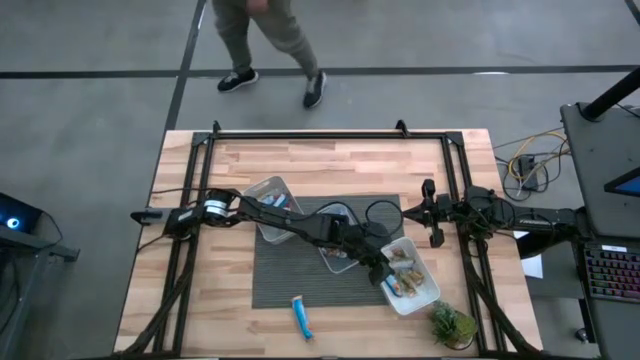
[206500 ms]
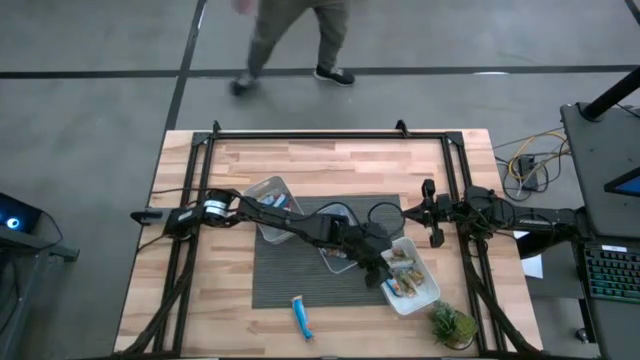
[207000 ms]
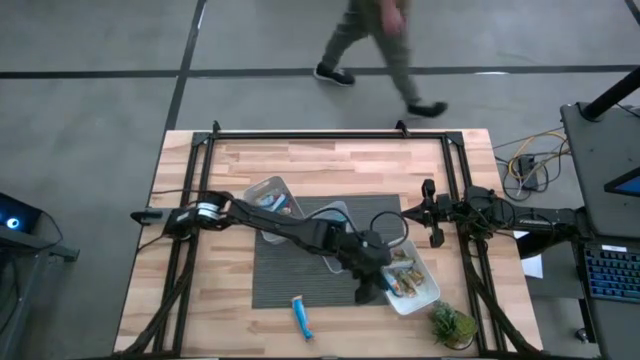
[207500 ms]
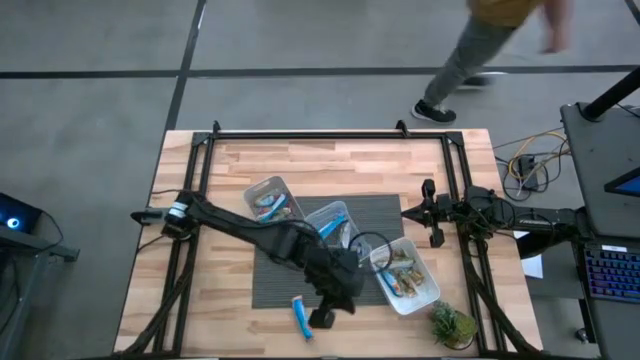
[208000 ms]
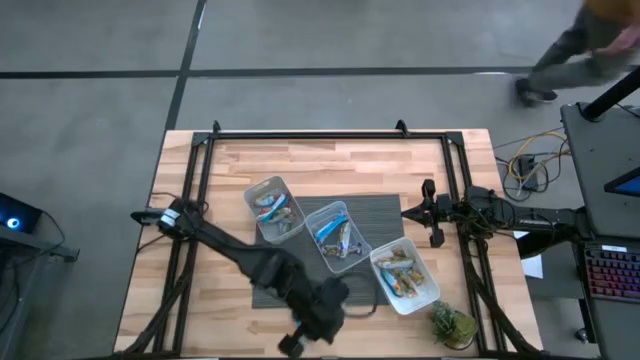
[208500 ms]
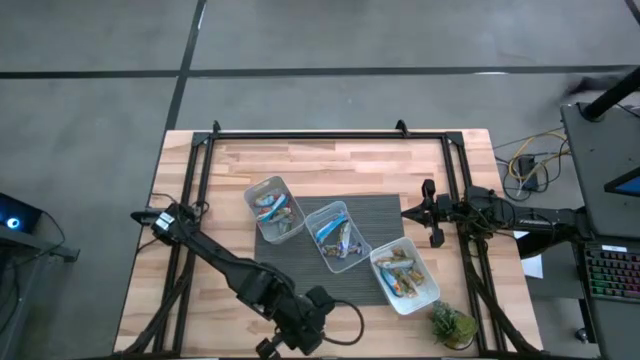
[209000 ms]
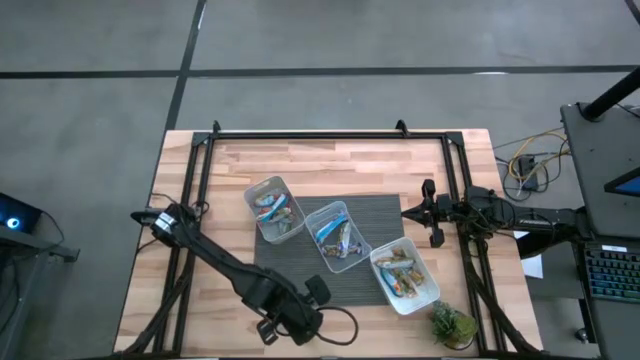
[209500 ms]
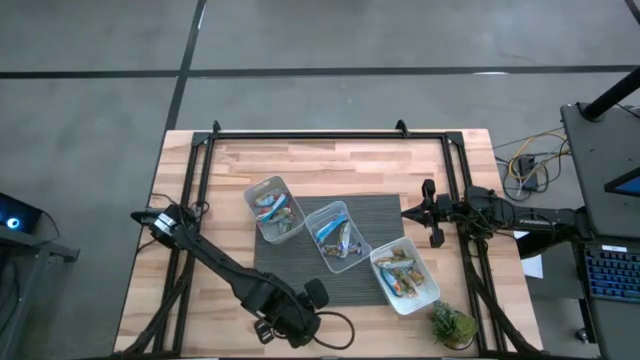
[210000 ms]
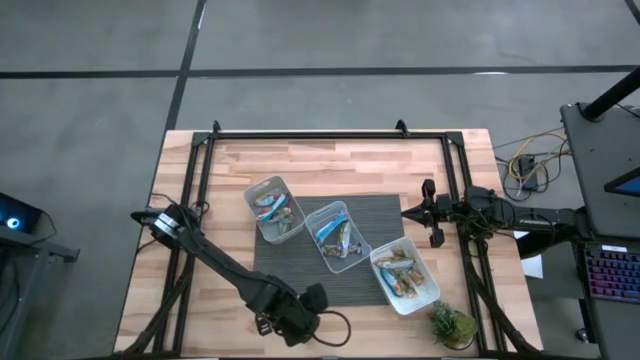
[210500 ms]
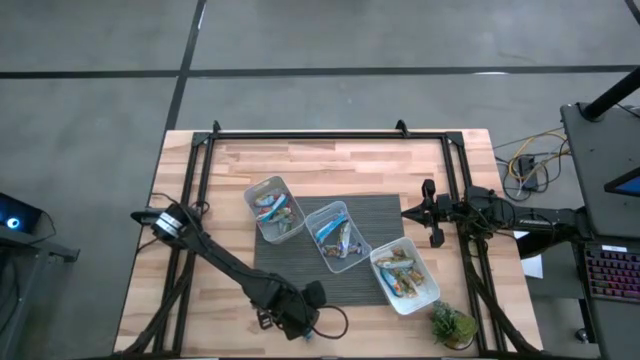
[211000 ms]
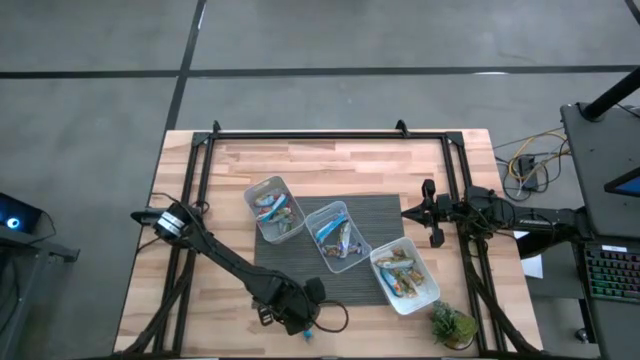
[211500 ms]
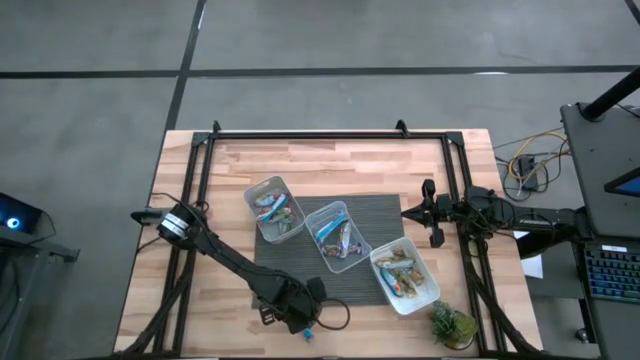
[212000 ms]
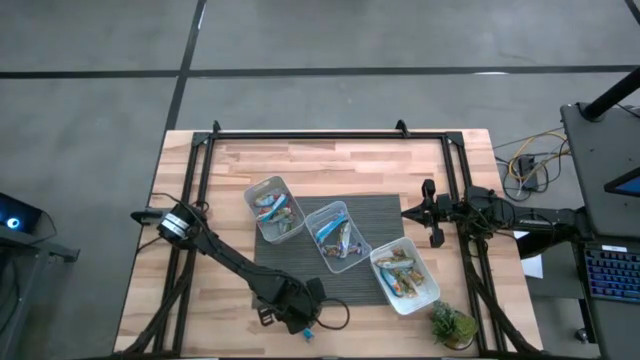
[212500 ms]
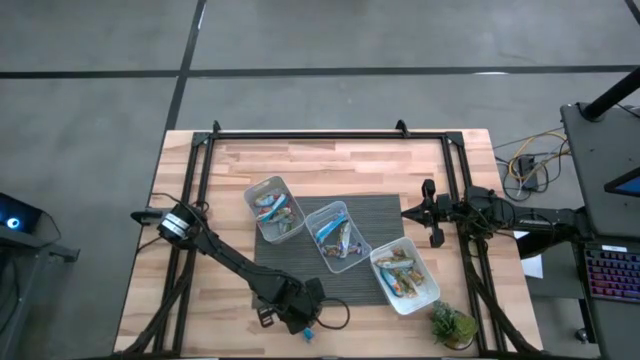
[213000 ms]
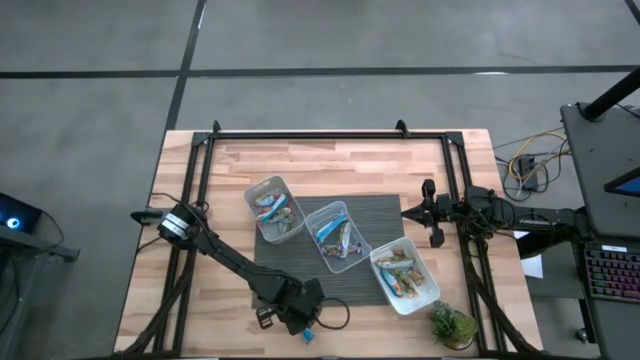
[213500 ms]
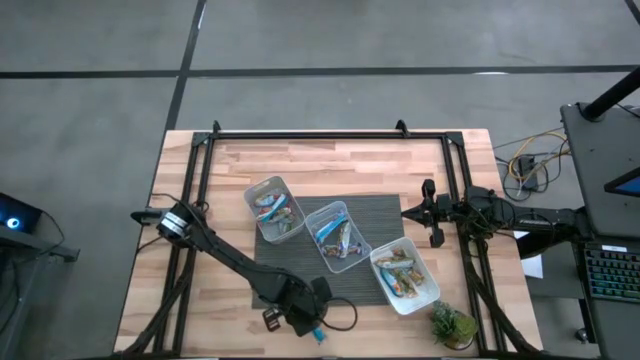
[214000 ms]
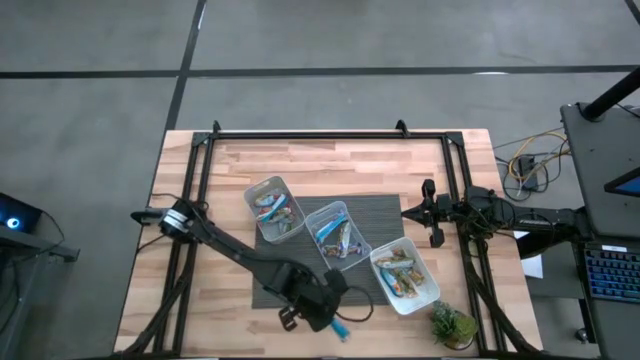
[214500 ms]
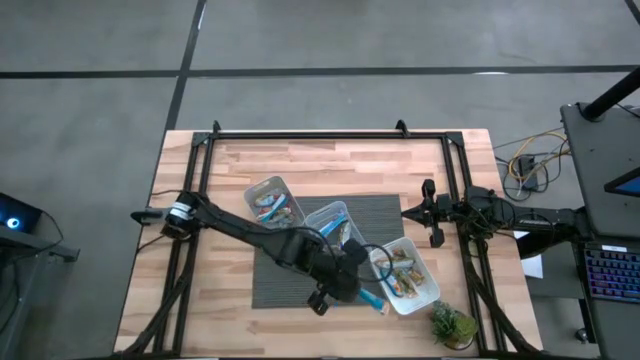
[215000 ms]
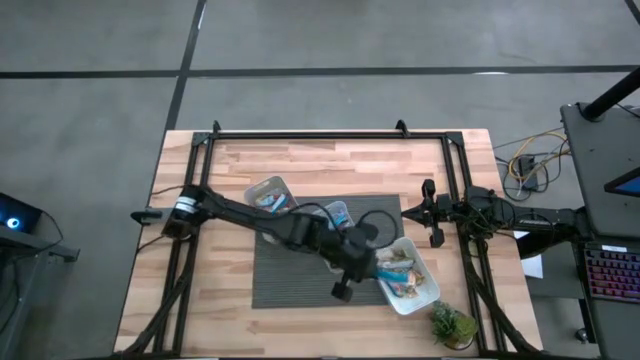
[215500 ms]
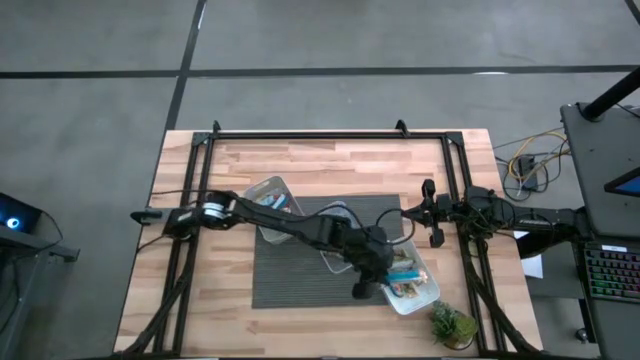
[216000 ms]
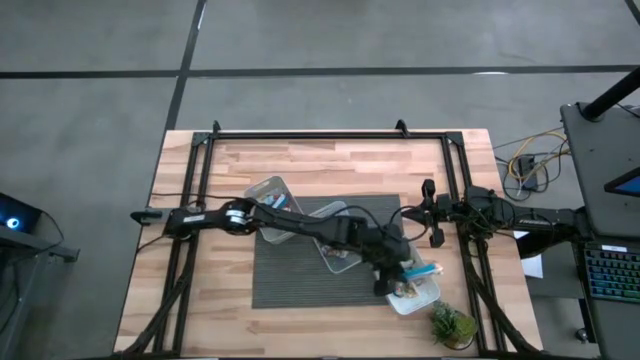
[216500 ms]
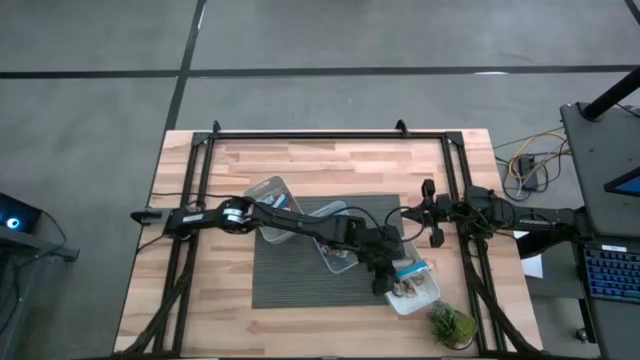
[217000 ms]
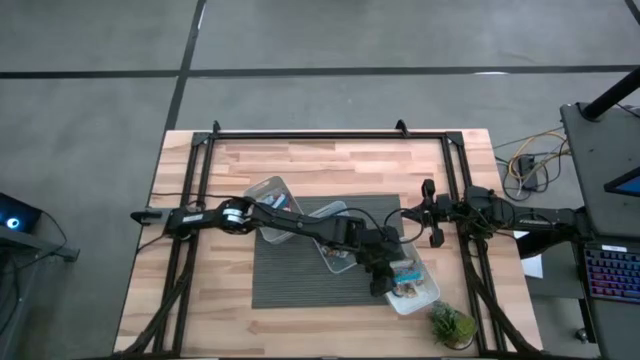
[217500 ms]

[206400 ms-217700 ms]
Task: Pick and place Granola Bars by type
Put the yellow granola bar into the white bin

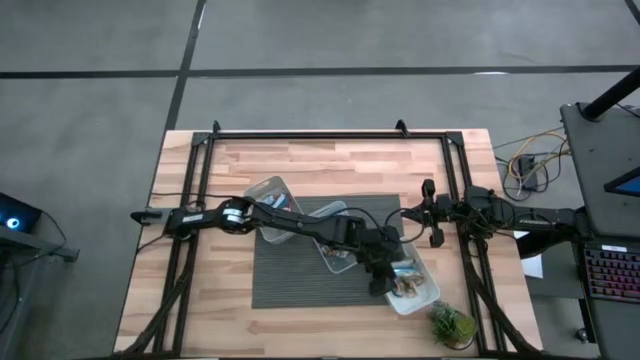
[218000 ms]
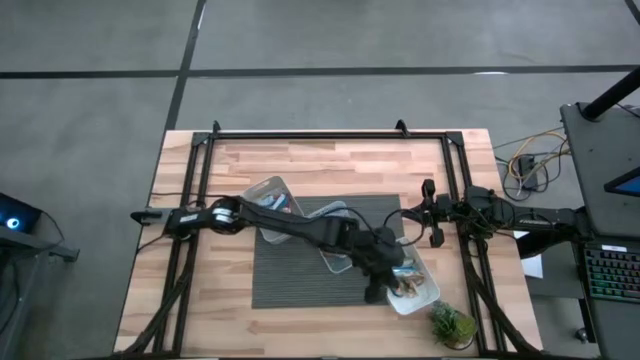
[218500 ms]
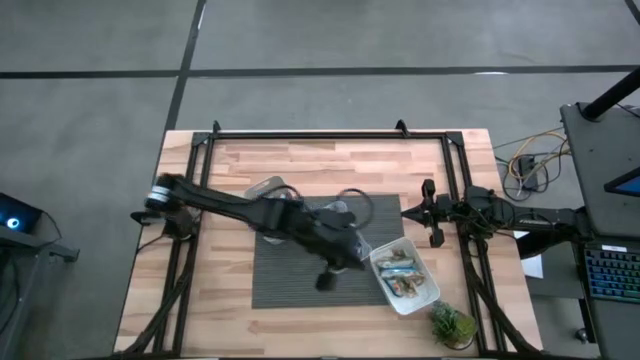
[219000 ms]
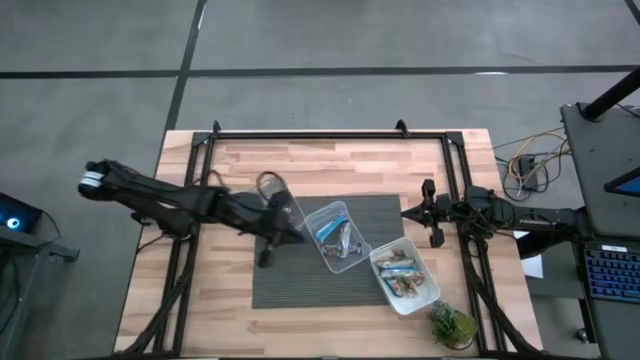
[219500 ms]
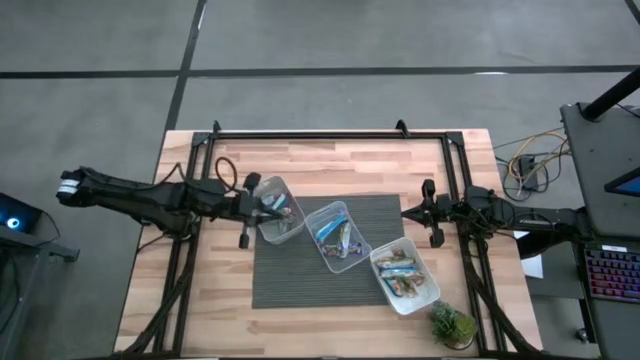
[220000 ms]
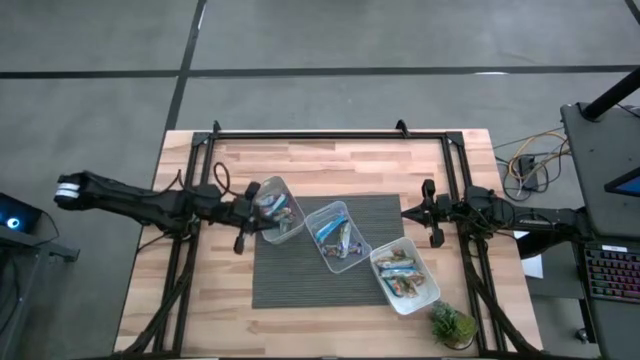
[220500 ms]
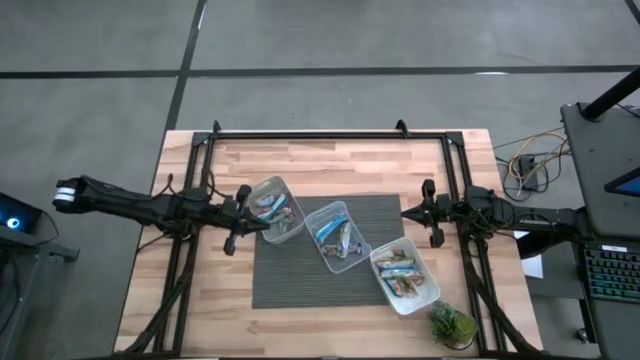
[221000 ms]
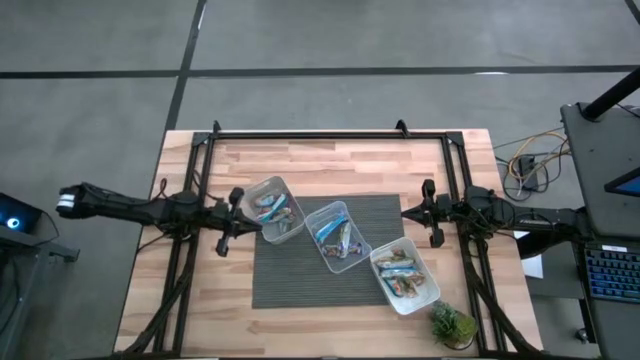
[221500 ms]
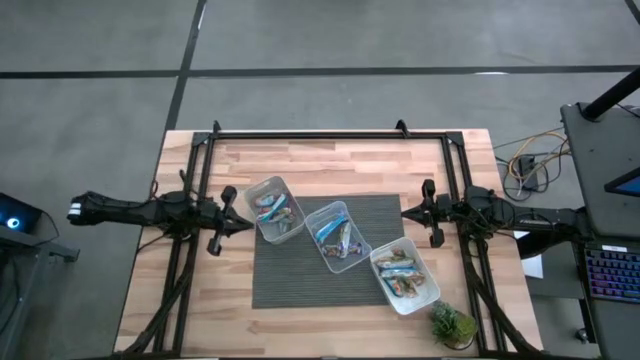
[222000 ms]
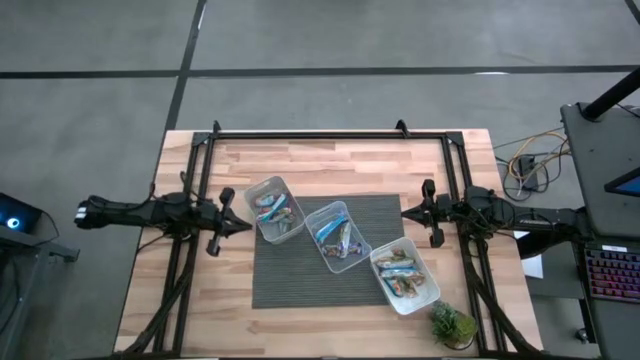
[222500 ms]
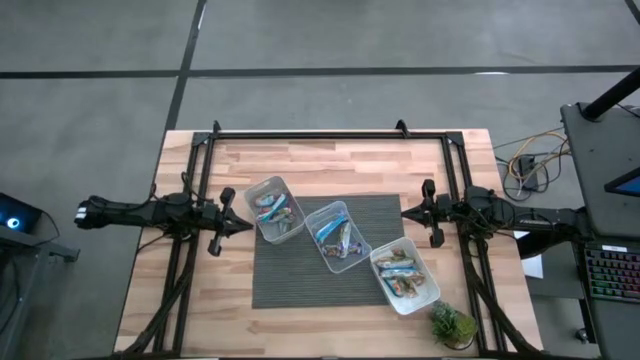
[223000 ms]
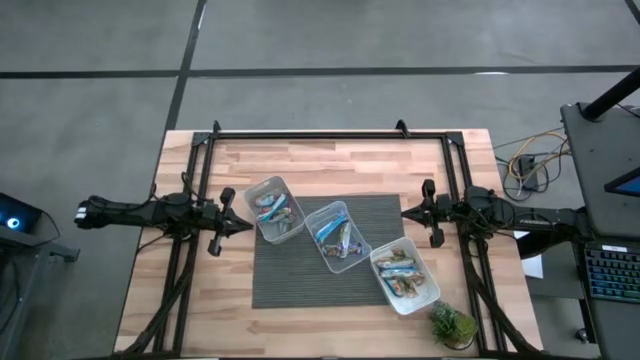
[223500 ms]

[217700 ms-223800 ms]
Return to Home Position

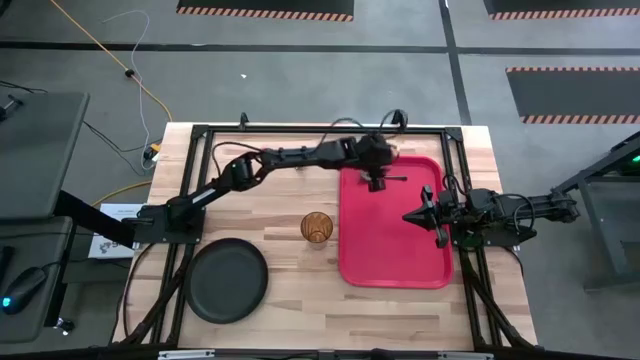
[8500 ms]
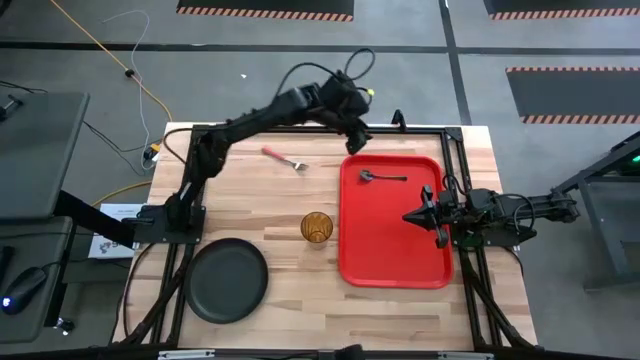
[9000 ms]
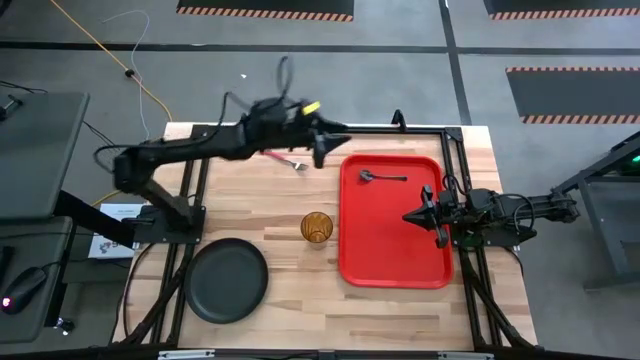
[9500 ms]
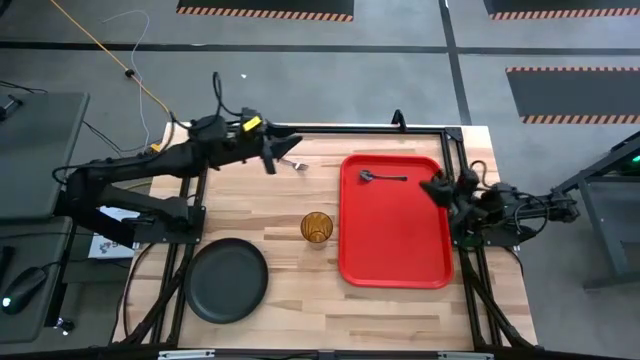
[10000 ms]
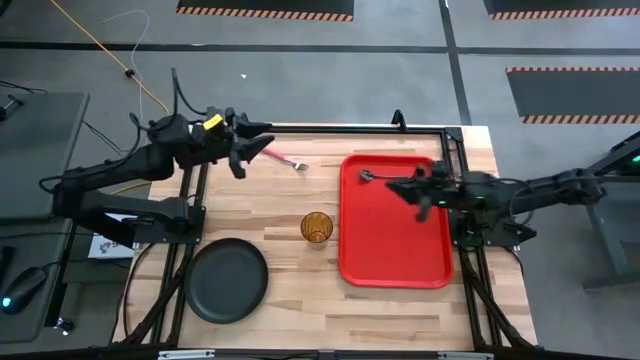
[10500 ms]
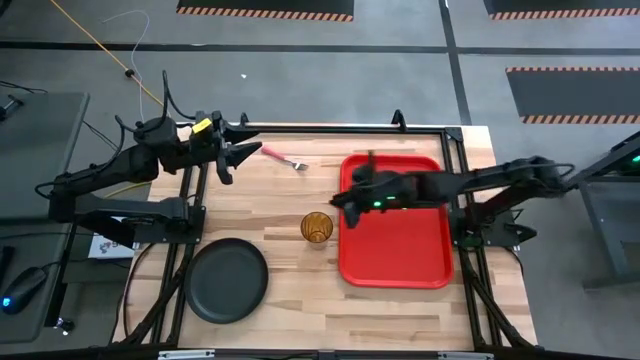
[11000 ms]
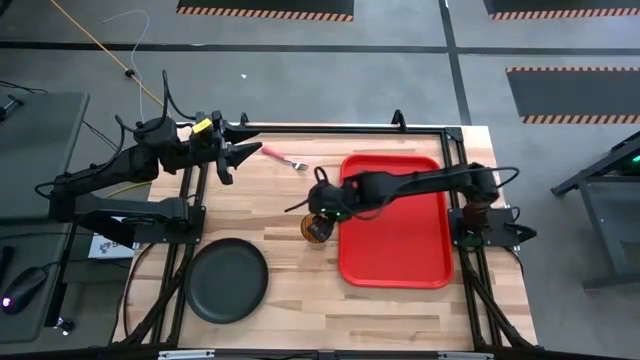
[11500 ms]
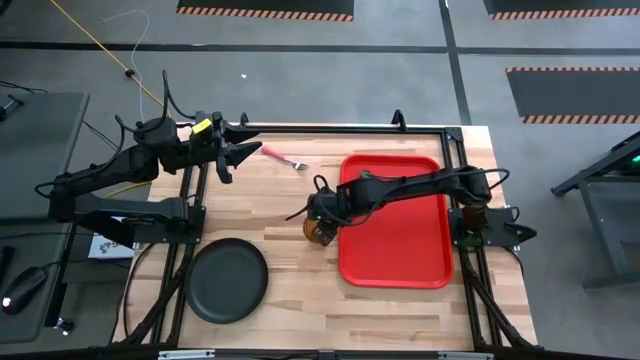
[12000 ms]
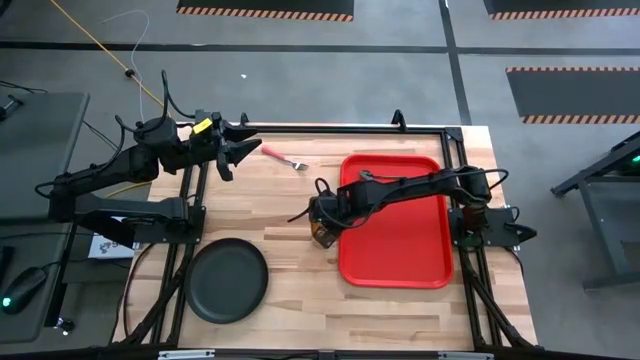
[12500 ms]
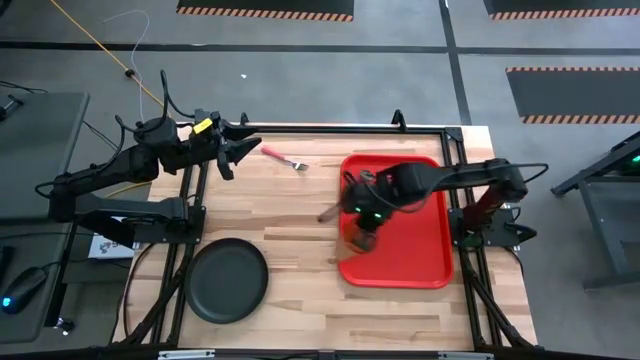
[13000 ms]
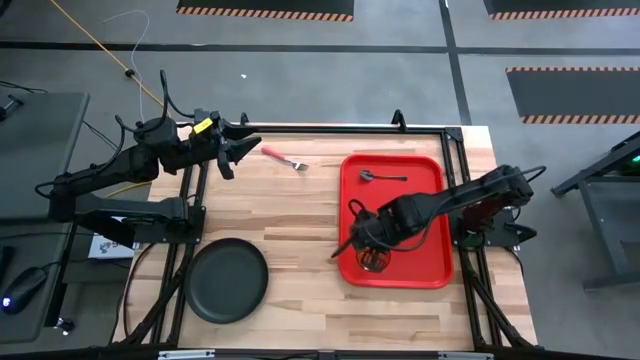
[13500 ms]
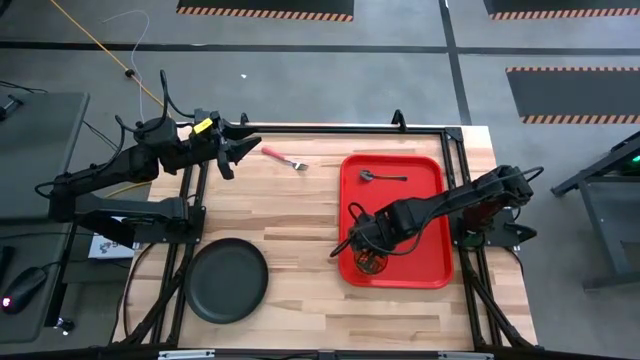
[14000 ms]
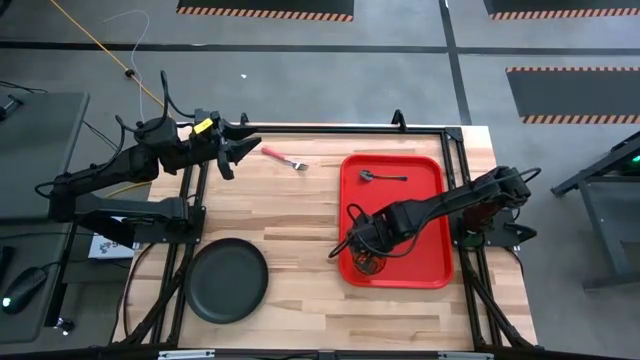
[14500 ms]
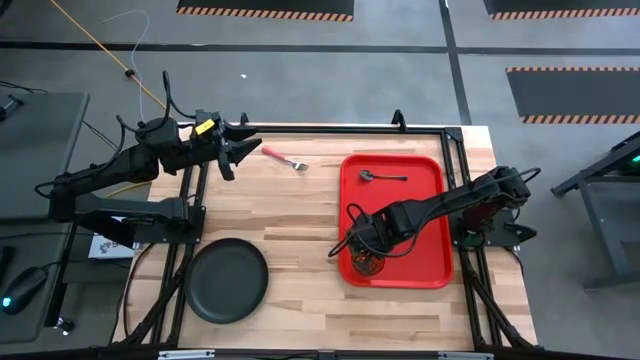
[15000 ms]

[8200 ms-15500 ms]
Task: Pick and place plate/cup/fork/spoon on tray
Put the brown glass on the red serving tray
